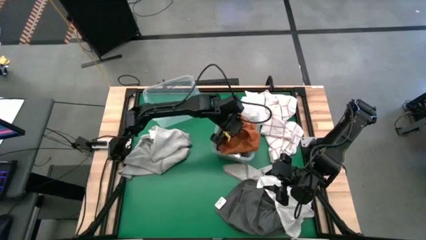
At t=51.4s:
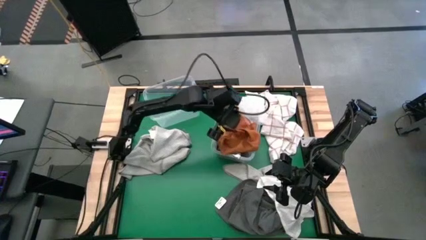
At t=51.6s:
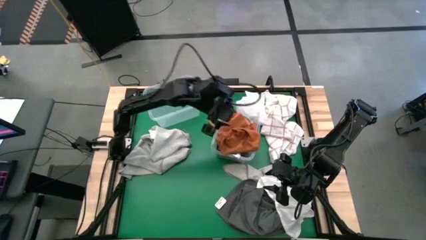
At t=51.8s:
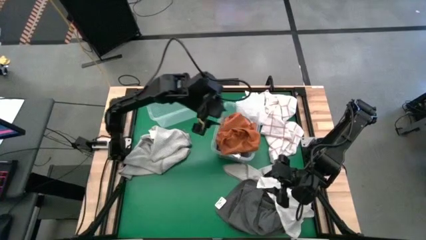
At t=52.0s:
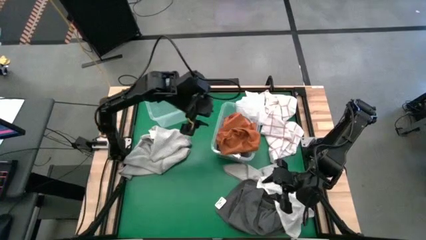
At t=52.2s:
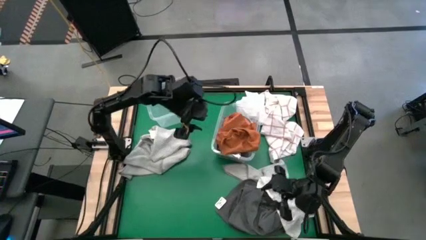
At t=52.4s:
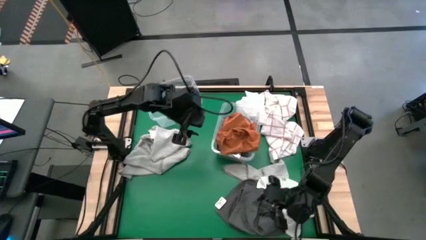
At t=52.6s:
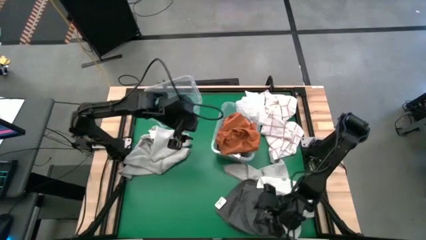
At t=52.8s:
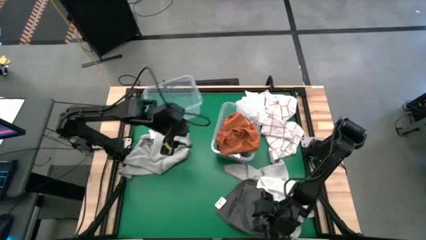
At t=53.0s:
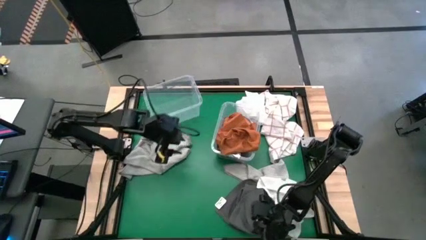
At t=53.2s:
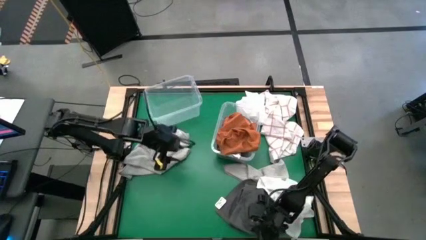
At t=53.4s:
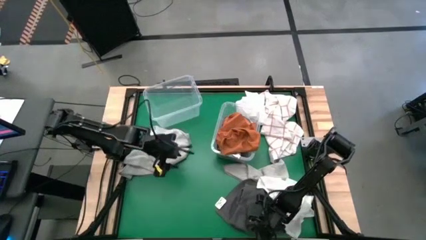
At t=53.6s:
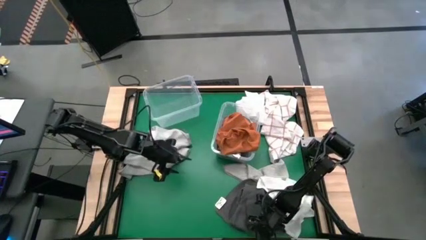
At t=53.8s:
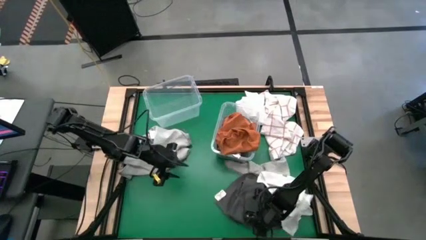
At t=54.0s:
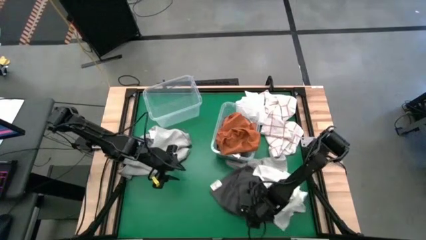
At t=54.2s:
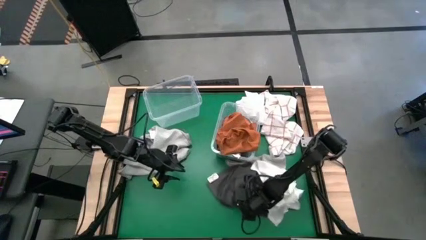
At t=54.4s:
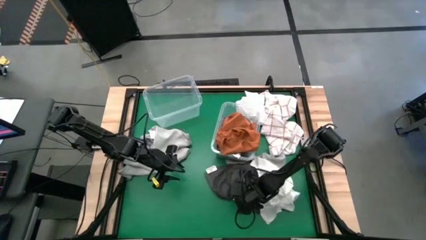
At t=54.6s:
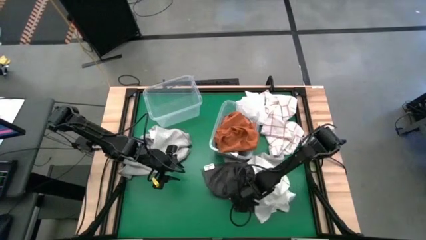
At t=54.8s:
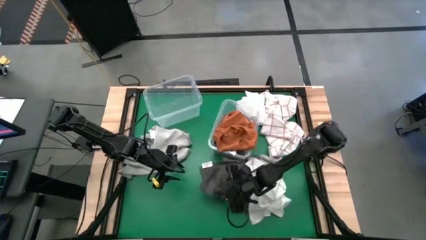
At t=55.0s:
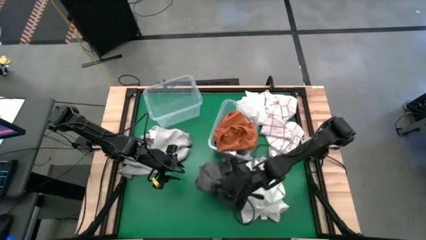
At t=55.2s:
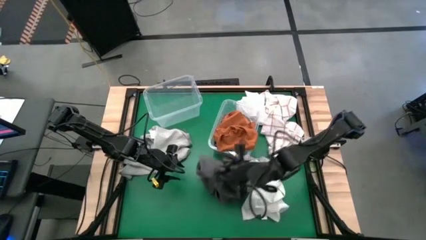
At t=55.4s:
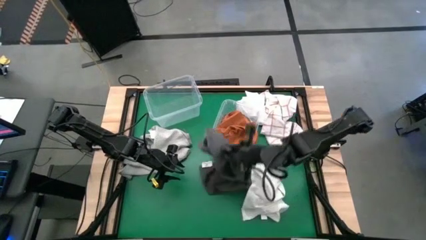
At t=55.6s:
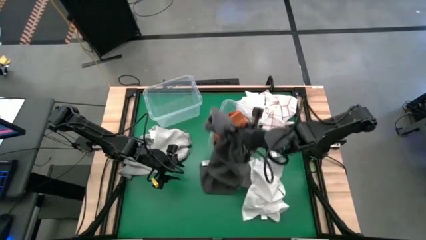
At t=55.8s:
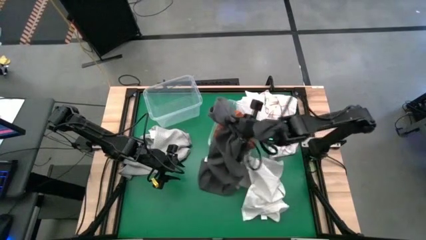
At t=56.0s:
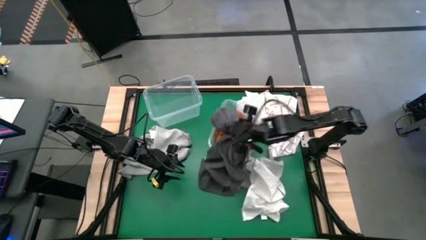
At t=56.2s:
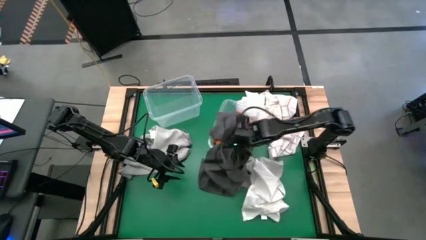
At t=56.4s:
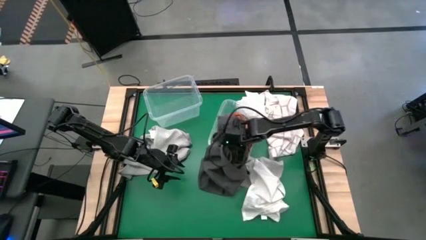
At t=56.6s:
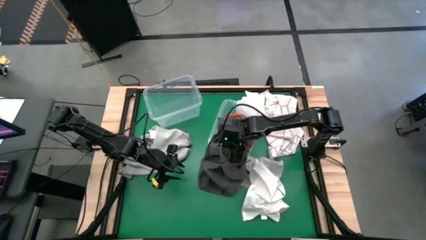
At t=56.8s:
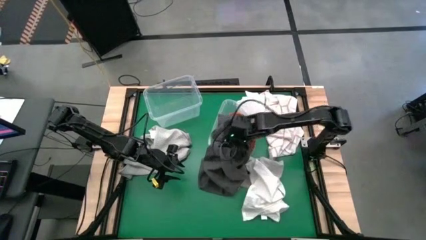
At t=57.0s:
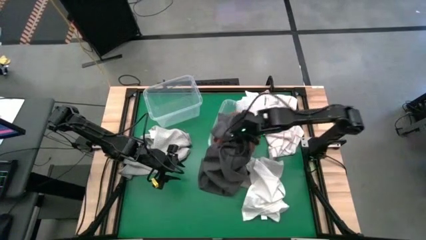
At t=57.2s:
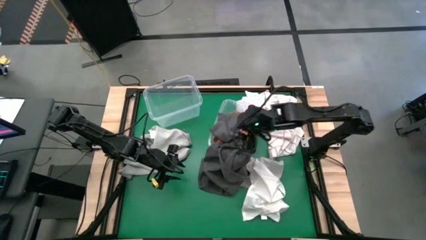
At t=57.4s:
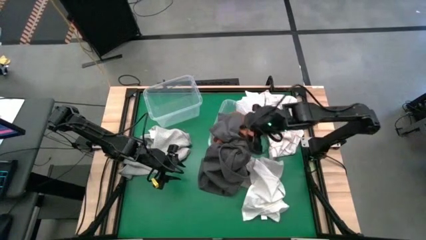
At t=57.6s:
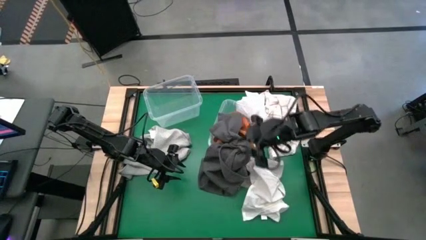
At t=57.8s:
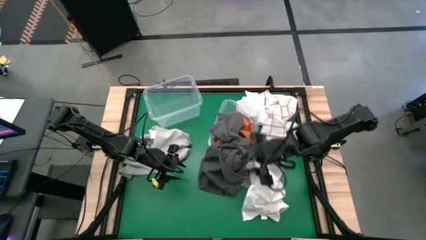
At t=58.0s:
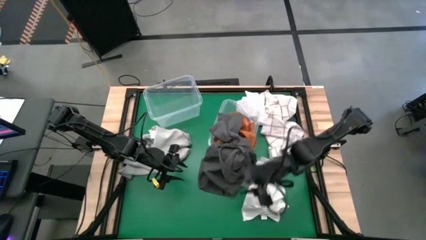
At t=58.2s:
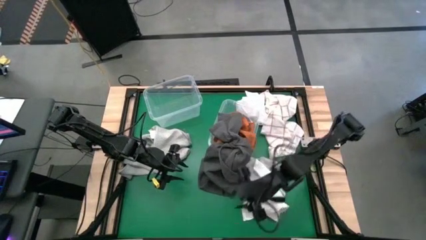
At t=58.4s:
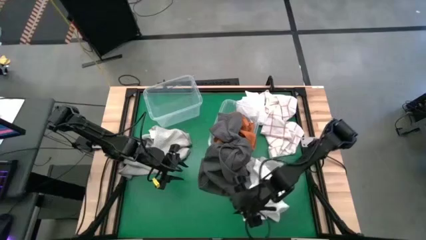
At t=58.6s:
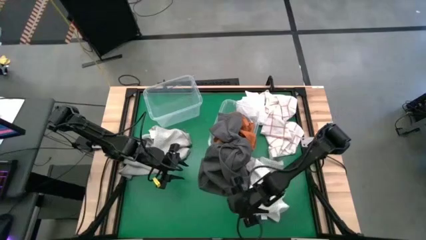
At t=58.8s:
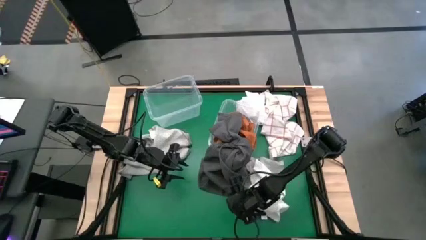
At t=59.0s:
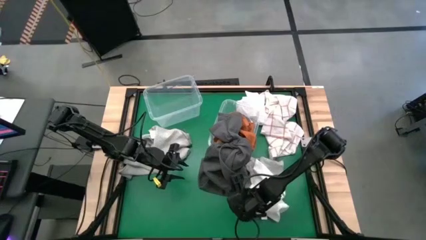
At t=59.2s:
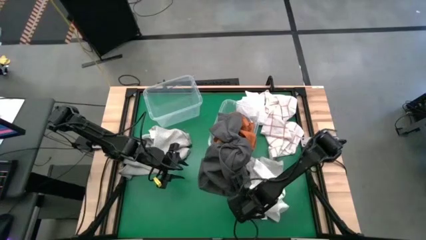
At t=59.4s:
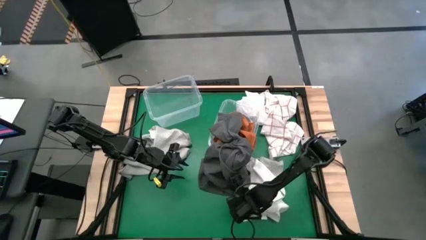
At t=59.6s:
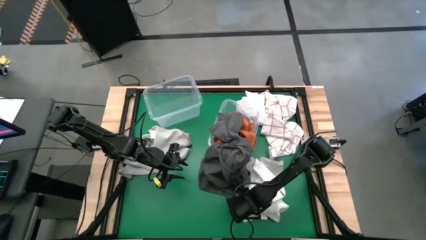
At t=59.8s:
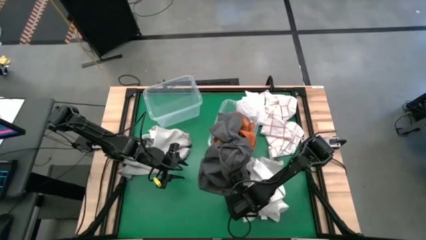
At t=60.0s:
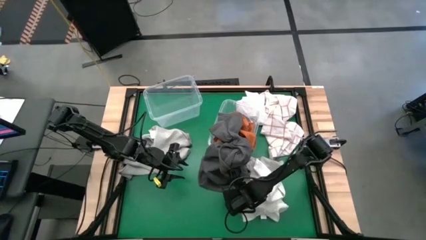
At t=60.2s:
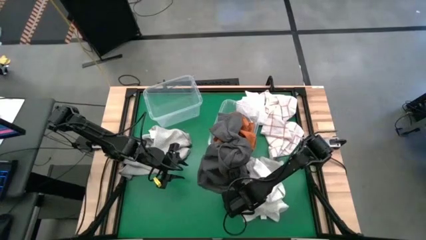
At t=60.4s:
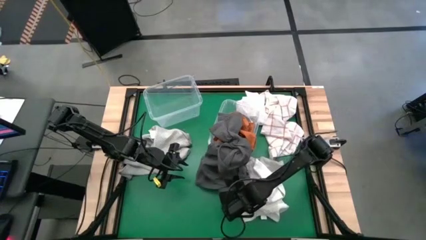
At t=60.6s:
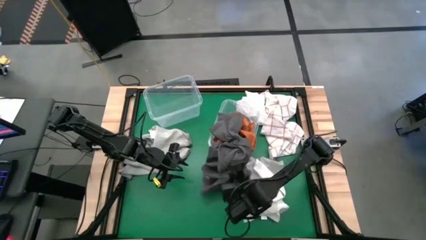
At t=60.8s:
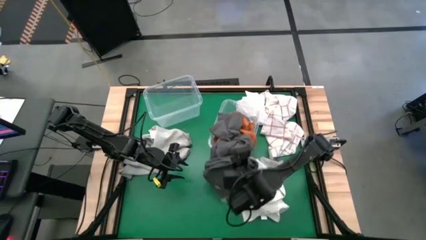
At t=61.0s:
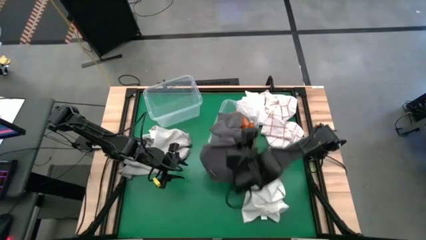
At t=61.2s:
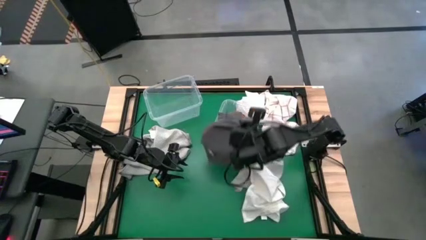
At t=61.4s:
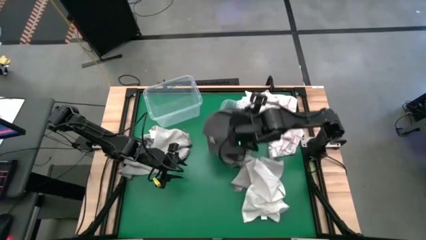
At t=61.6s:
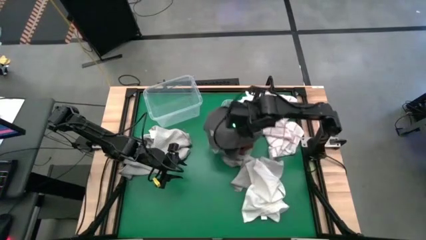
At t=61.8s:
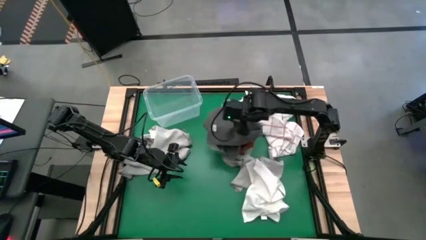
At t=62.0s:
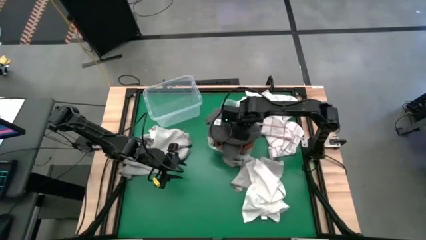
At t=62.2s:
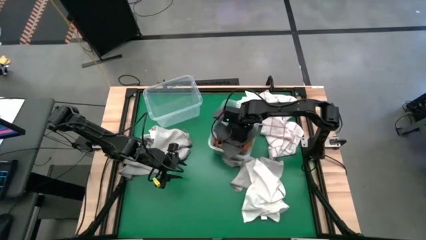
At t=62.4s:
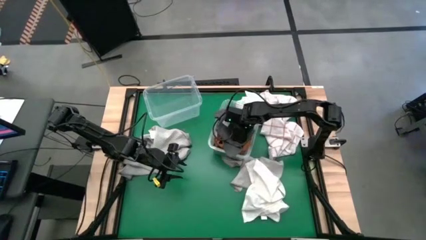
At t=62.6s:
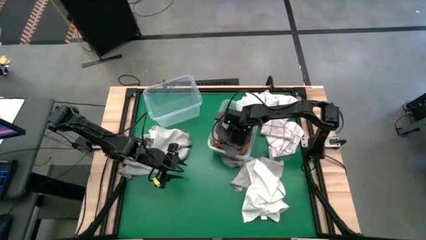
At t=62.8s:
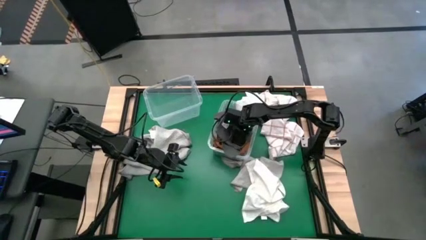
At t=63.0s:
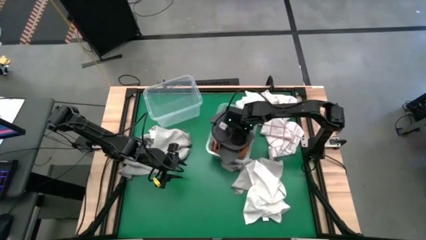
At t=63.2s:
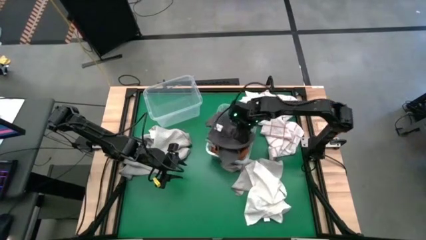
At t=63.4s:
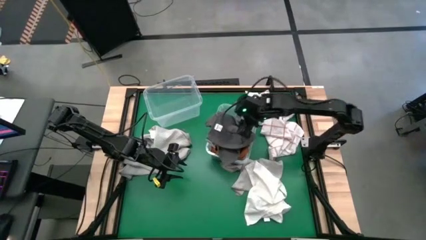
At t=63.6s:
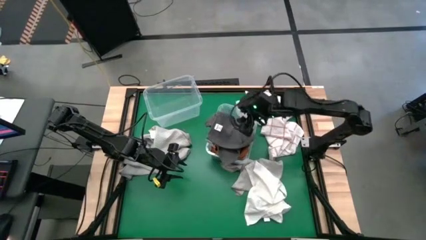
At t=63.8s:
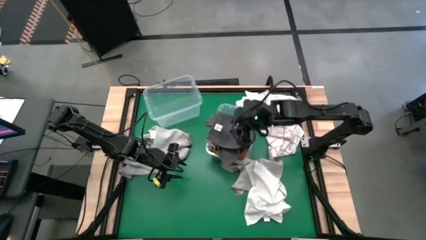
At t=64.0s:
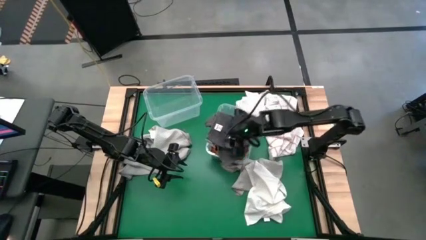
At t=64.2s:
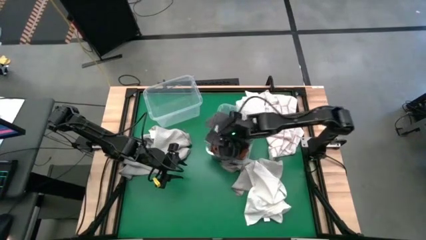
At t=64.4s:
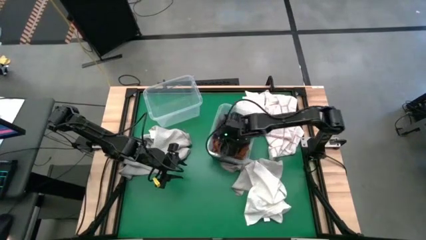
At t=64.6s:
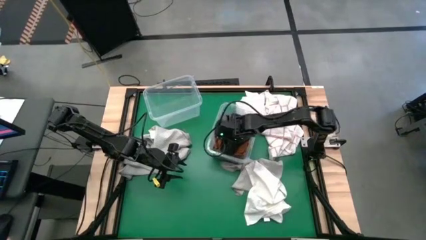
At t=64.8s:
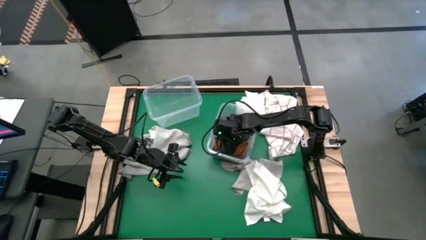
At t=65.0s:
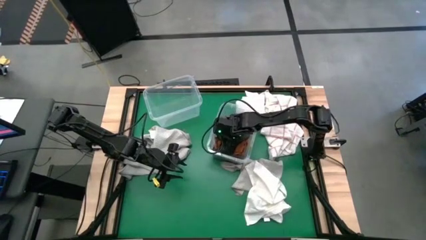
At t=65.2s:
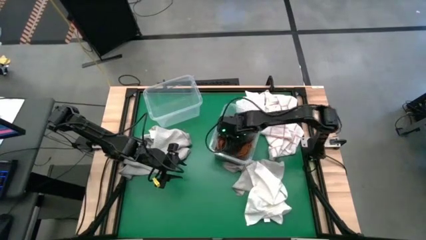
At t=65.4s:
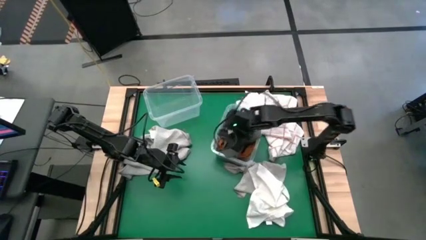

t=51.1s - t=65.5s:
Task: Sort towels by color in basket
Put the dark gray towel into the right transparent bin

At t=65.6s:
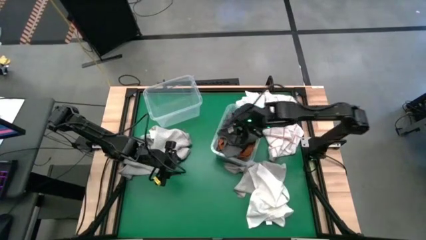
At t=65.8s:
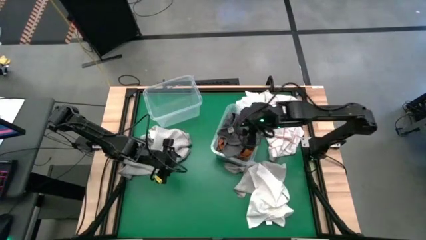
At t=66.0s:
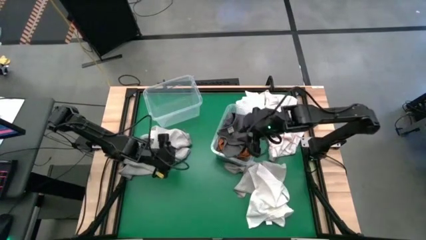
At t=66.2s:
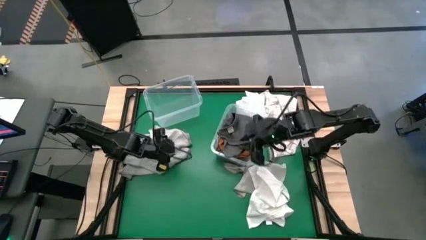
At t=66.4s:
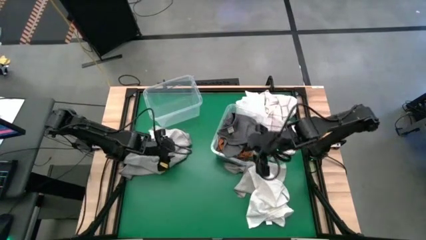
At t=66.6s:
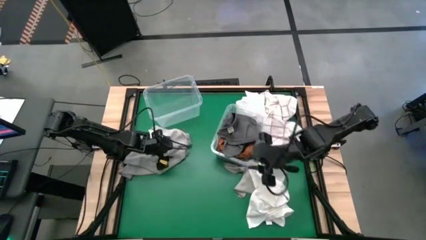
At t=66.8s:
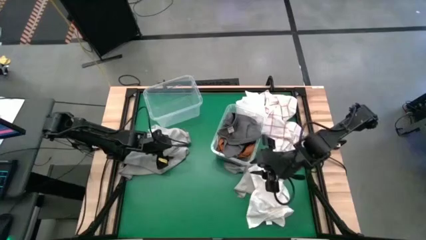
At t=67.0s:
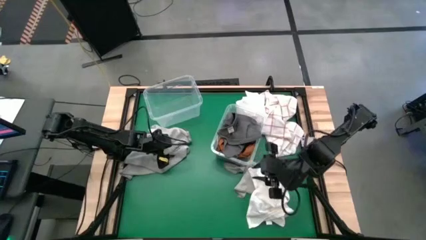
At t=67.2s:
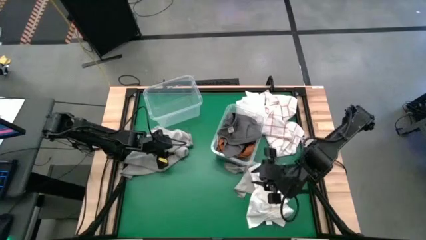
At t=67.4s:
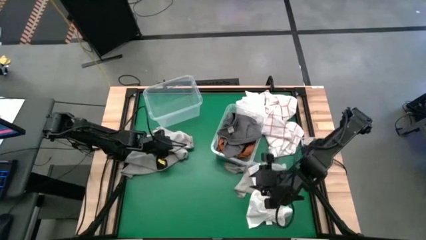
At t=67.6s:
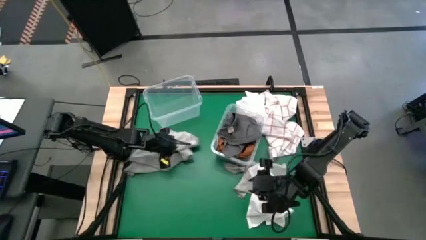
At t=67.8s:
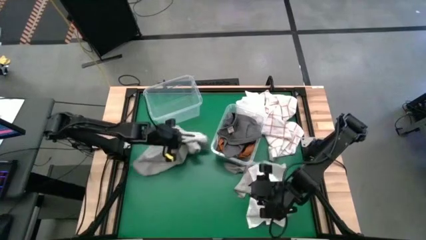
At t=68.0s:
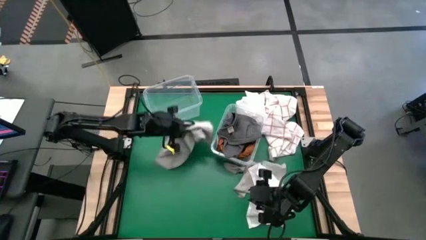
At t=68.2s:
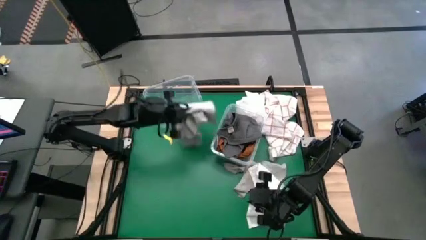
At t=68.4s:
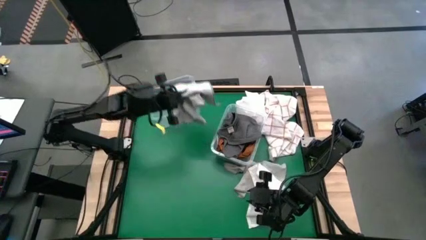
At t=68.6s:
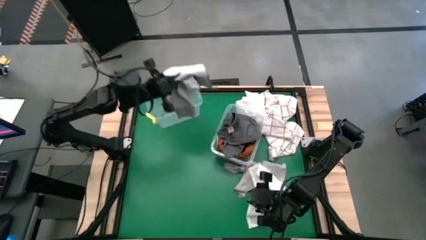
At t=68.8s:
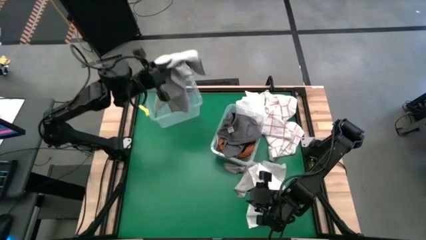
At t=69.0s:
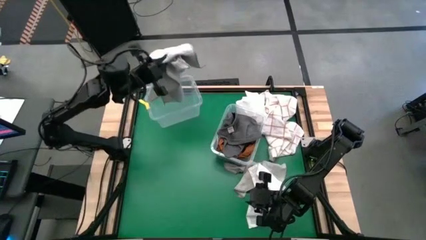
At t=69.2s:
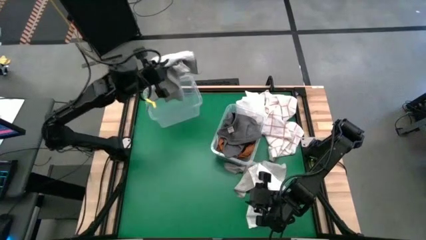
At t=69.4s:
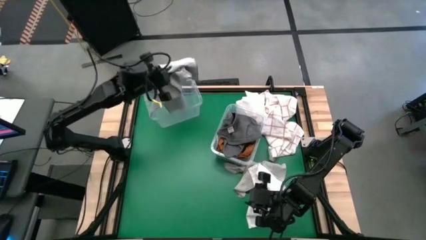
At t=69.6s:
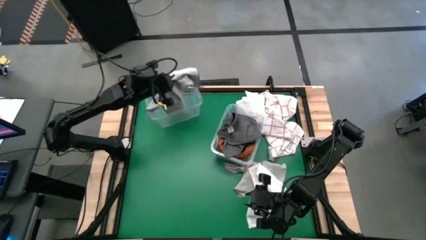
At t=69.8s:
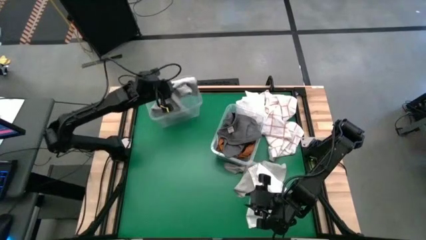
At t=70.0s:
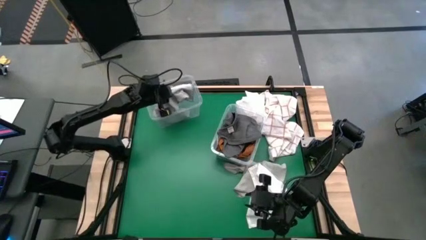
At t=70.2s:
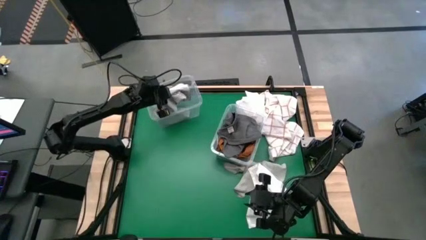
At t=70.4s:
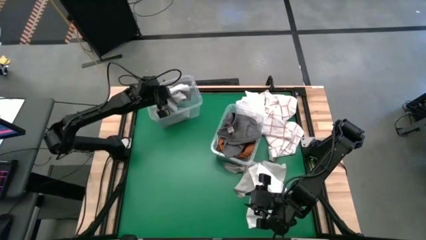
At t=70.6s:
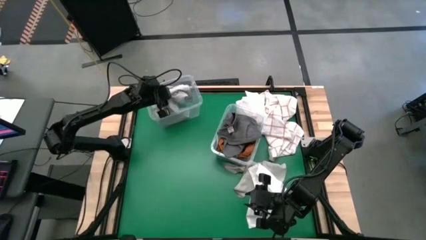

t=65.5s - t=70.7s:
Put the left gray towel into the left transparent bin
